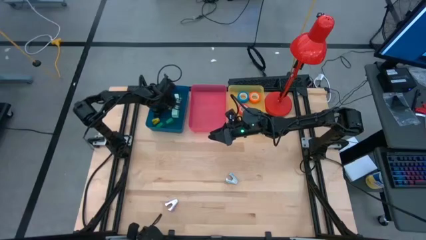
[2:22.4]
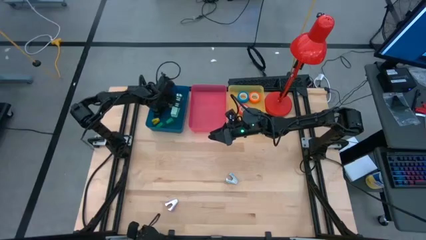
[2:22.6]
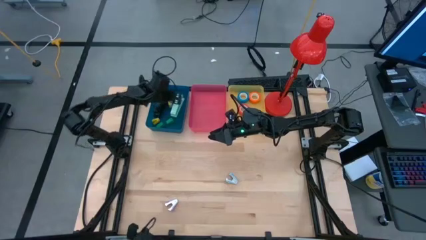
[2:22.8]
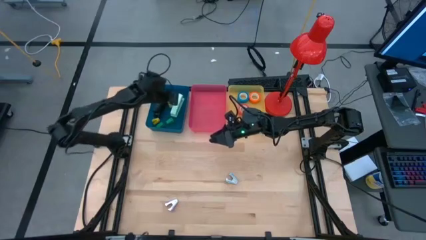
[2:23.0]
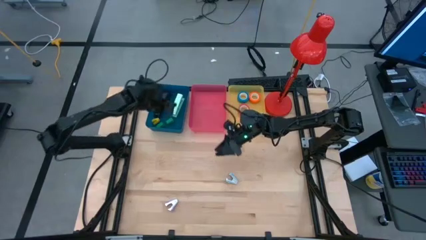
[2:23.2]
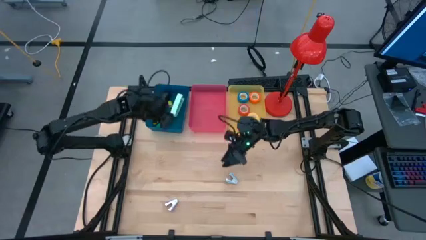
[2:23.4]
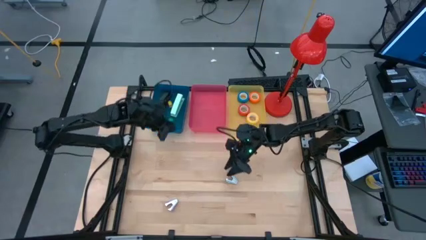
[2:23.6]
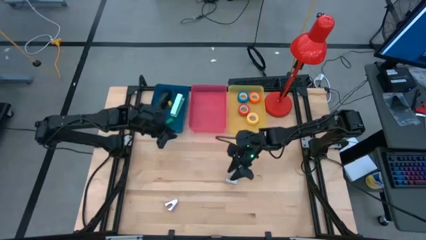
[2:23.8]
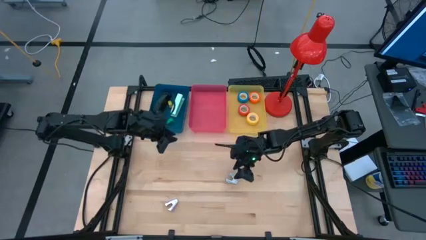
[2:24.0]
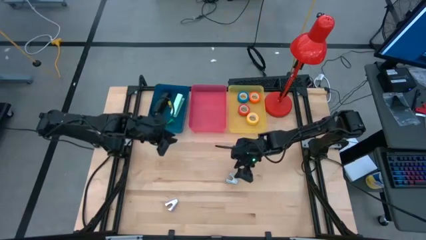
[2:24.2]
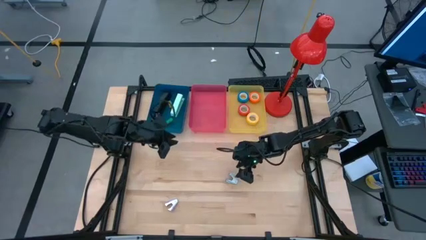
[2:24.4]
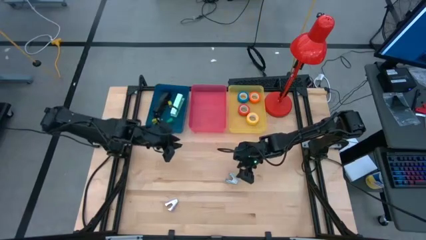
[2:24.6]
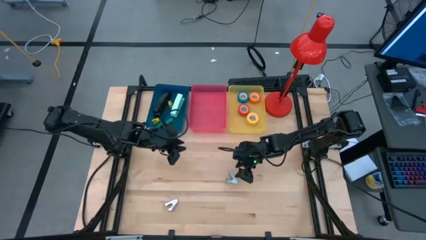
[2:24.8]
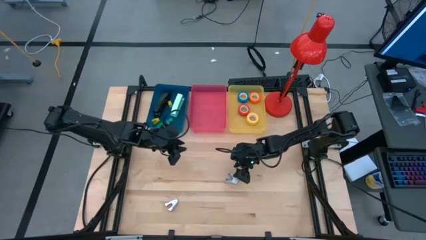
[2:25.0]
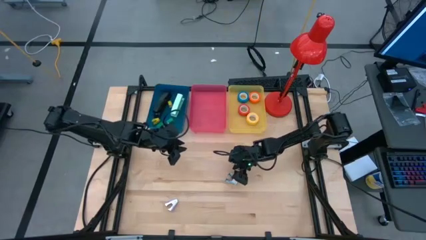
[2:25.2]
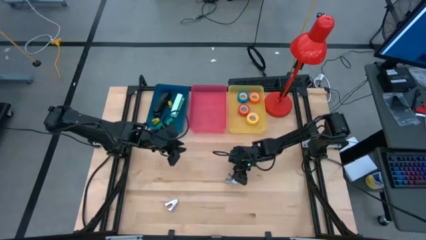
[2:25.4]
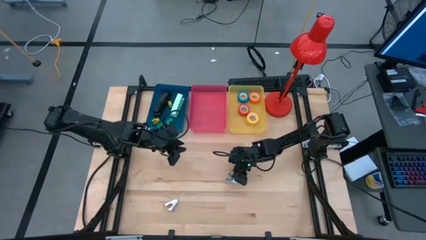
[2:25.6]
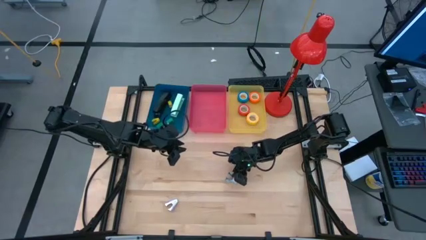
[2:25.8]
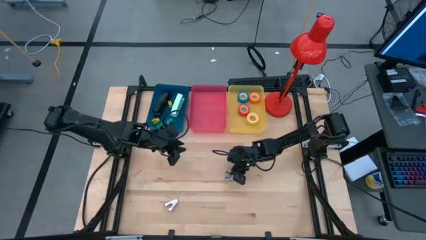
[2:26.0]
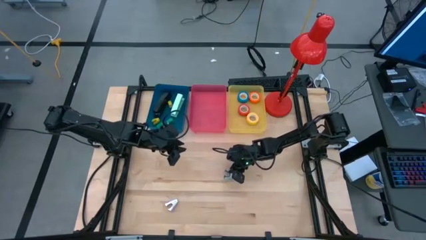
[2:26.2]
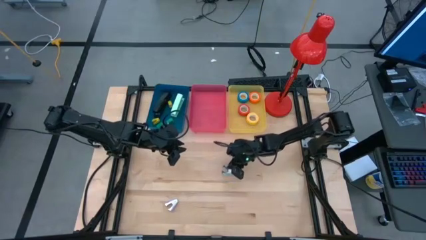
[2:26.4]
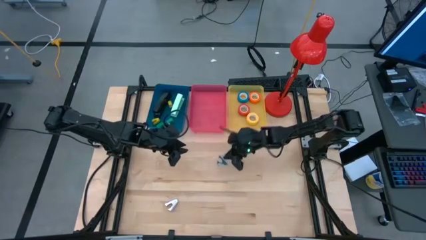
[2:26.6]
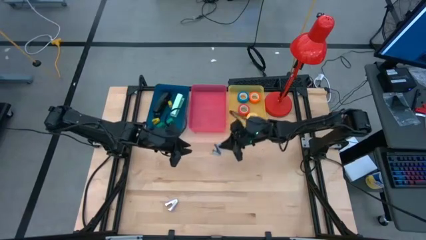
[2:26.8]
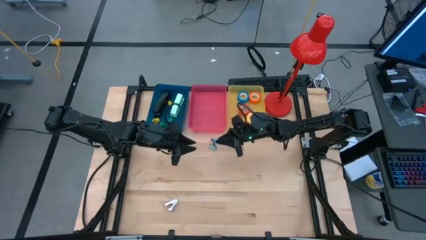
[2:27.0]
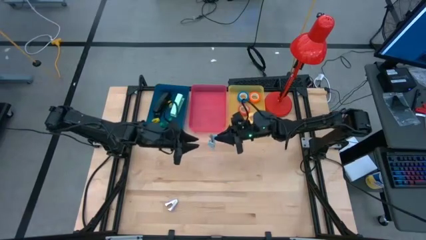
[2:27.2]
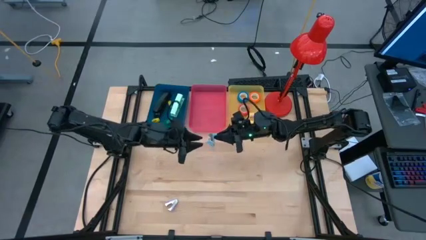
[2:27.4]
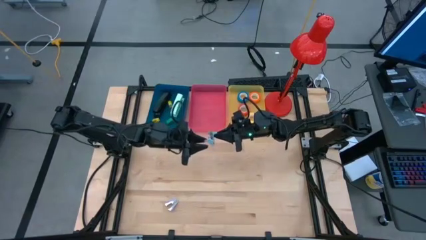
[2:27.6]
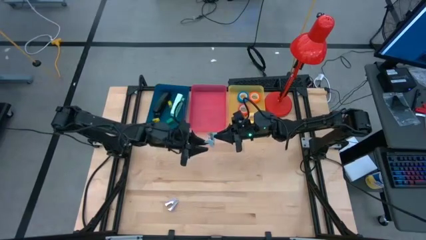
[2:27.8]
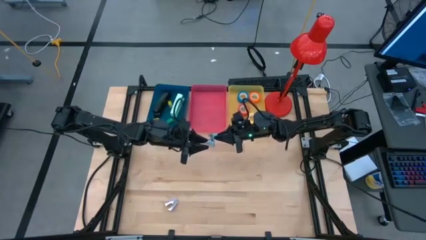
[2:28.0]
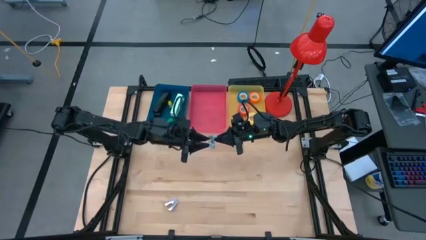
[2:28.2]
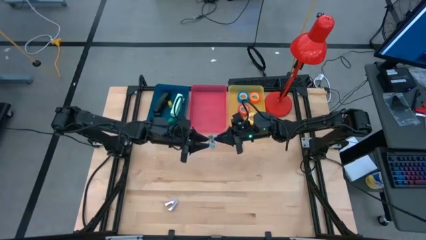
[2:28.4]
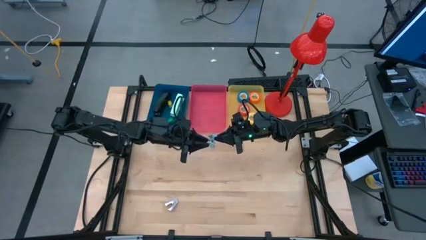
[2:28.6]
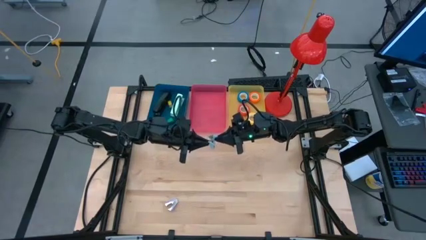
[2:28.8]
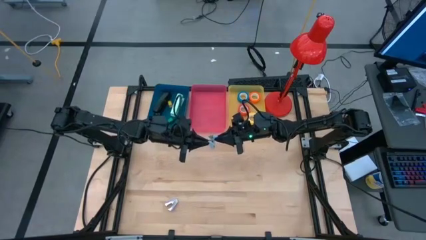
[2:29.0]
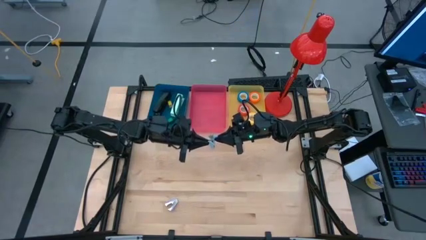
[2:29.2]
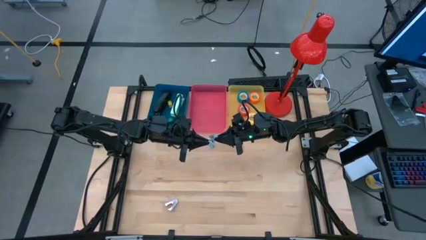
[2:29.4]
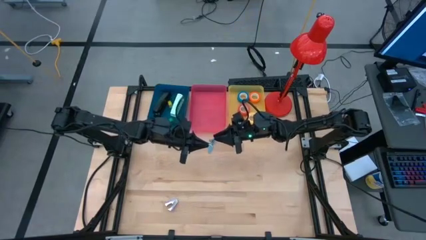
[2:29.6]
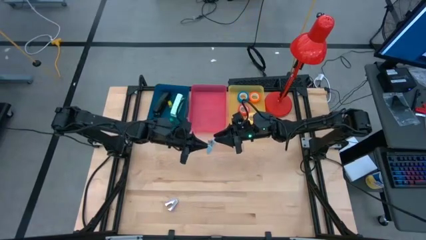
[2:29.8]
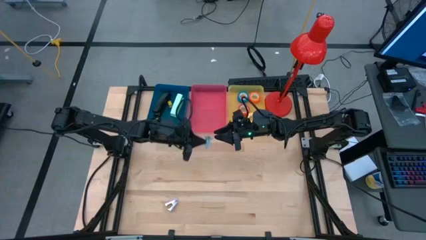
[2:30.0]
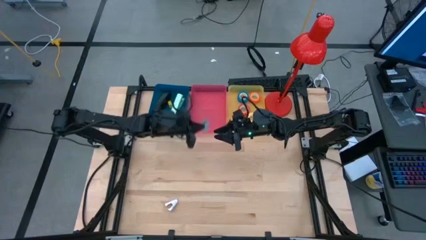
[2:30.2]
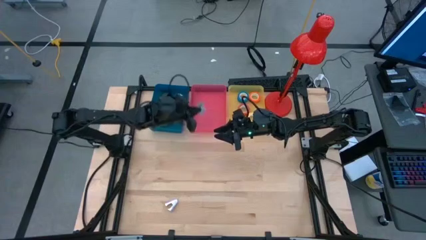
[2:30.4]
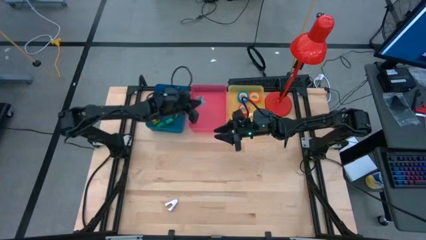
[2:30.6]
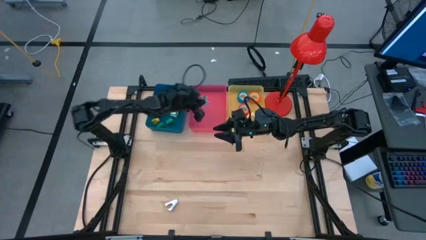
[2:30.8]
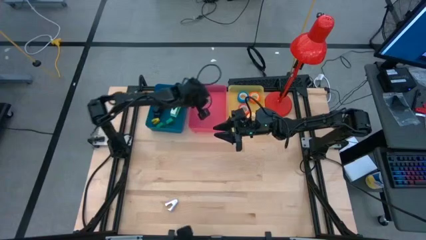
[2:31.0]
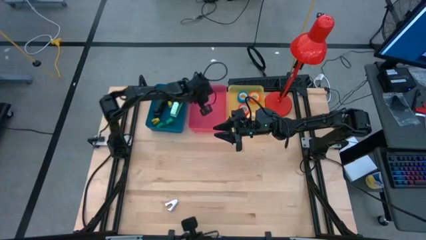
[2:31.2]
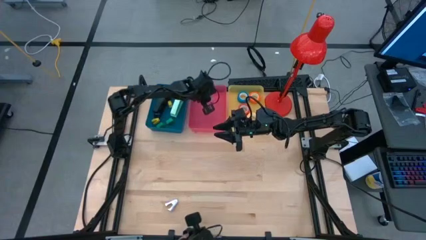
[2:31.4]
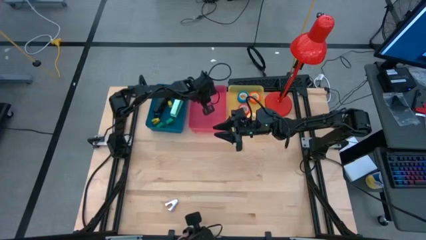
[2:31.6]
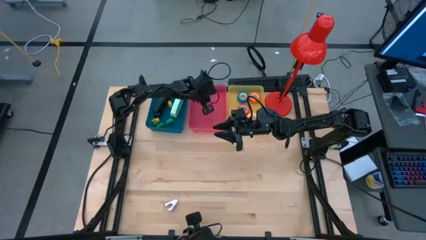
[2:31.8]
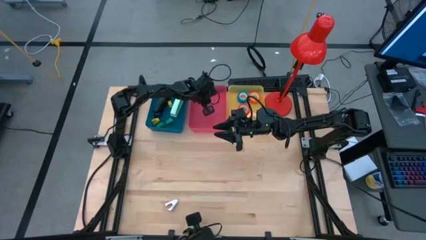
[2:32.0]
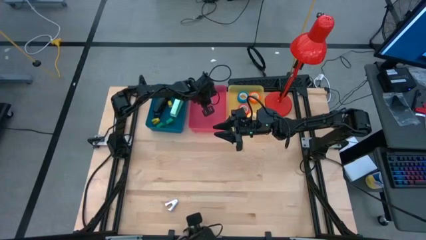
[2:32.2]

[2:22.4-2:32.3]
Task: Pick and place Stapler, Stapler remover, tape
Put the blue staple remover into the red bin

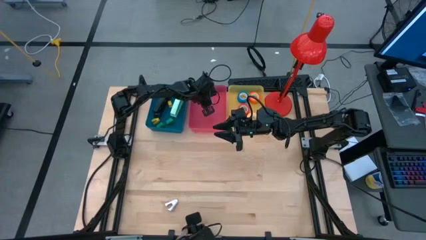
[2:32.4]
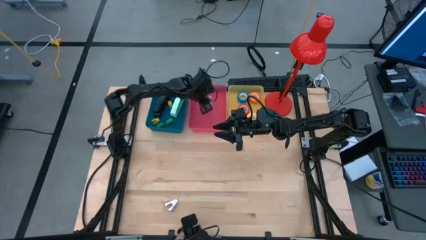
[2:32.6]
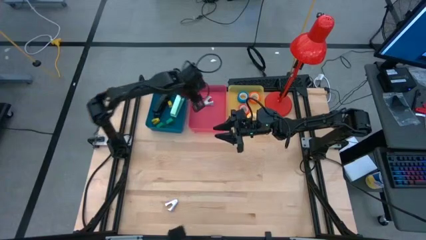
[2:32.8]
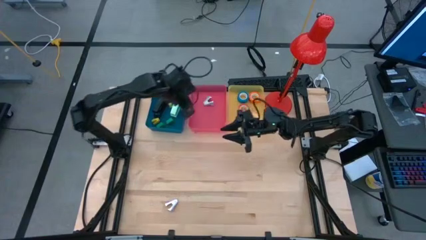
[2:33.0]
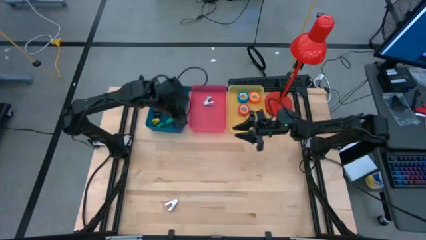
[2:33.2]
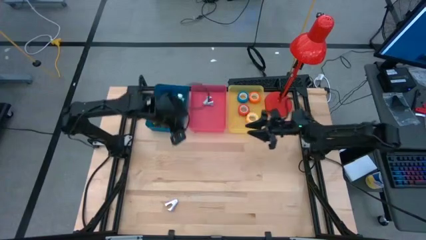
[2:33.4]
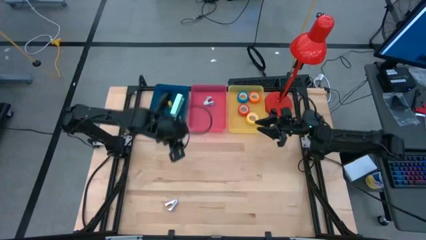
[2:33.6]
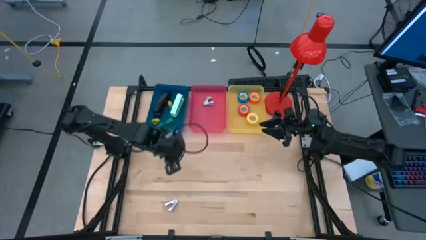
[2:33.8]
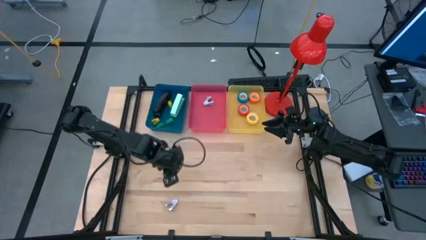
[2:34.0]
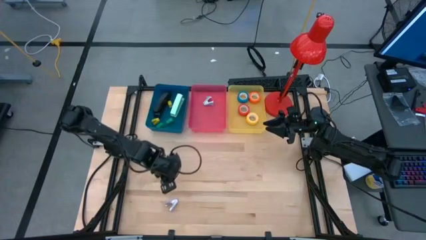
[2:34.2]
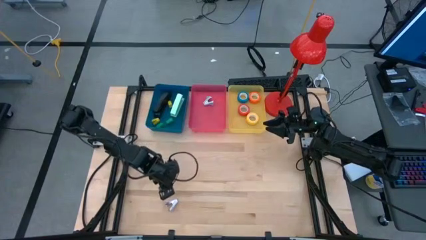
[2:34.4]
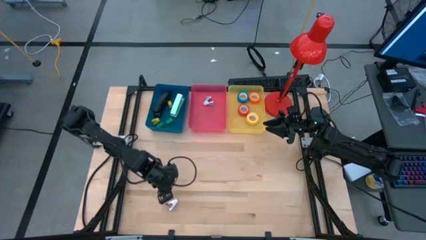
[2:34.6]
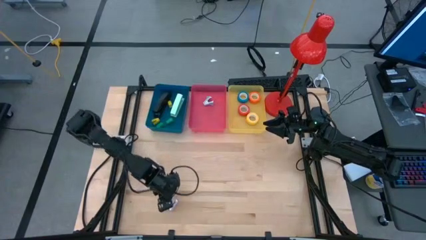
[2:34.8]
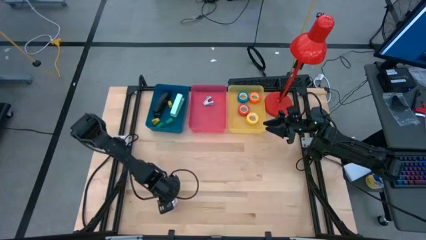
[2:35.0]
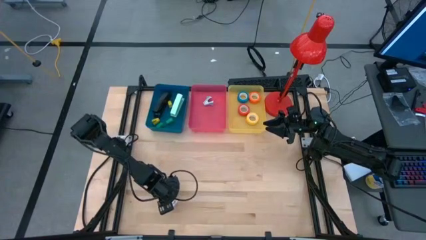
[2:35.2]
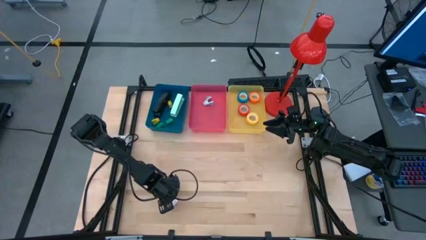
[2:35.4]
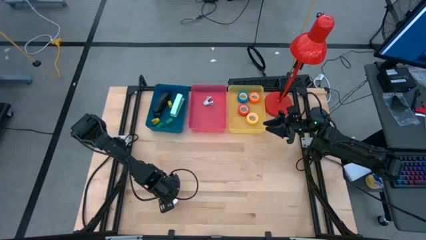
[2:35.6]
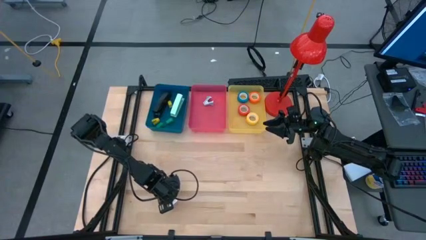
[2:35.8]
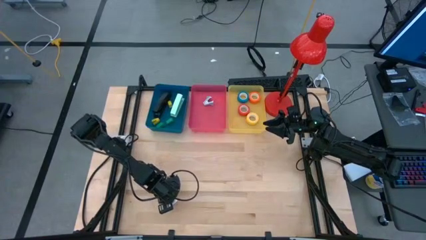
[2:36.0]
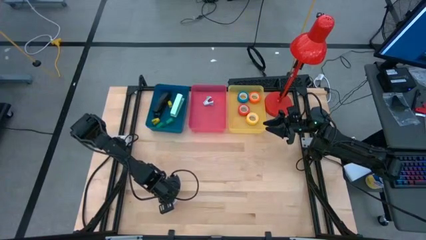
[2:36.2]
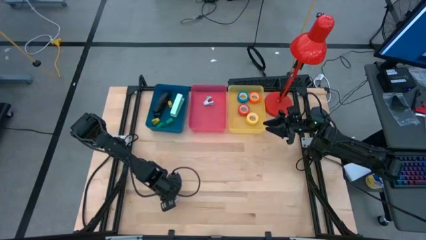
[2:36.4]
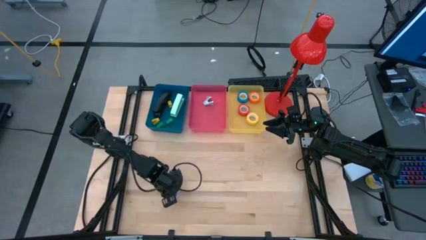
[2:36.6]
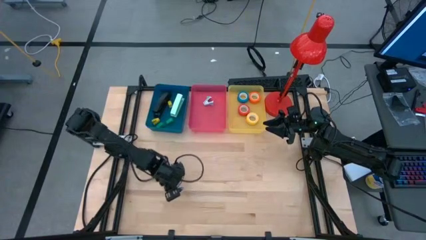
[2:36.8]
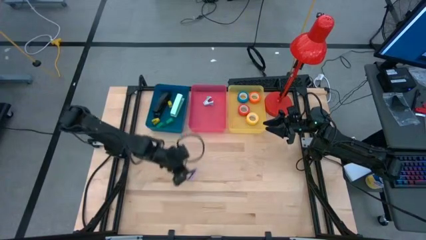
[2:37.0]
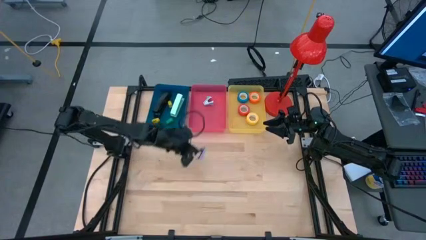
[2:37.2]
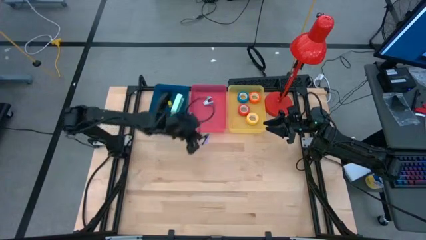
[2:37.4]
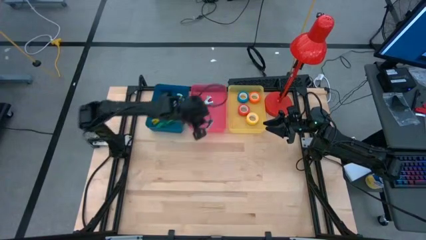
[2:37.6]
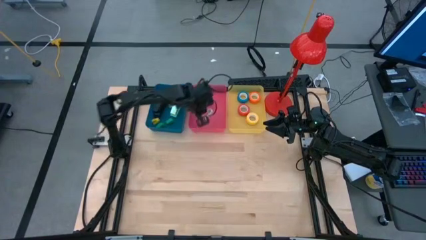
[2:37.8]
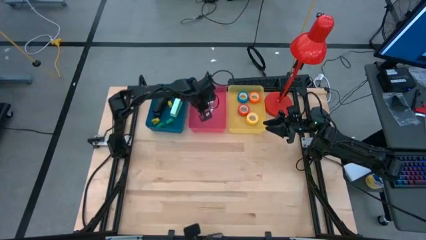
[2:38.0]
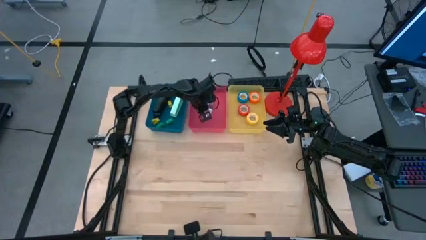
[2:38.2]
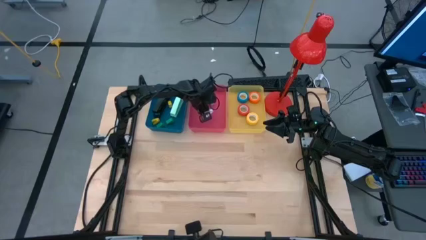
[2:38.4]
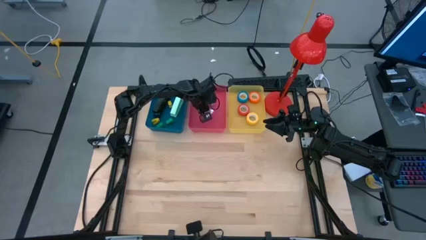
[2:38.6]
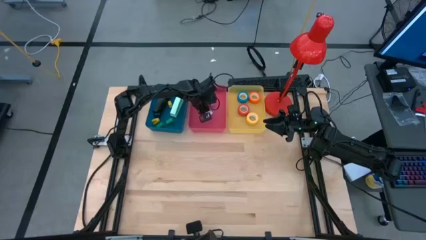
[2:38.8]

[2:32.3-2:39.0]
Put the purple staple remover into the red bin
